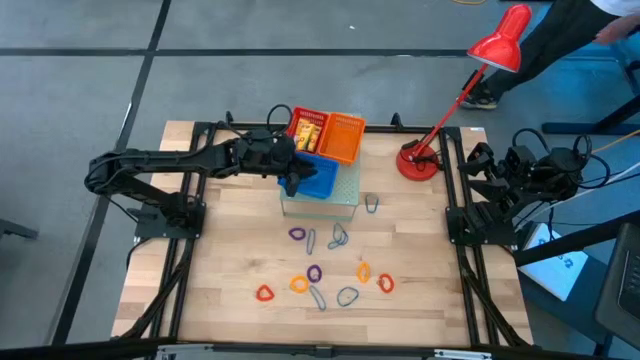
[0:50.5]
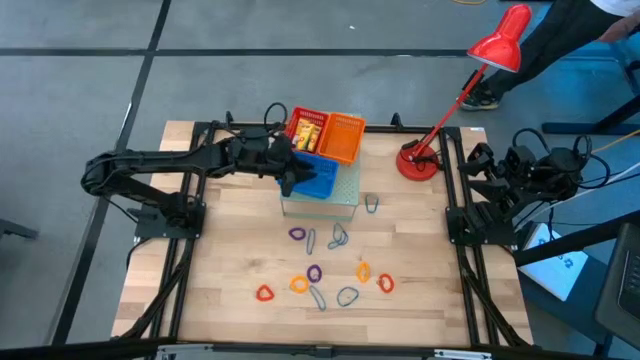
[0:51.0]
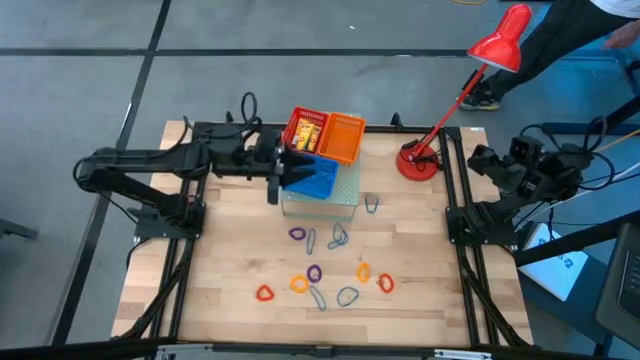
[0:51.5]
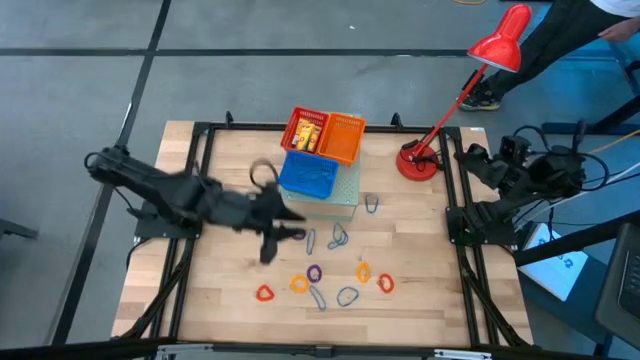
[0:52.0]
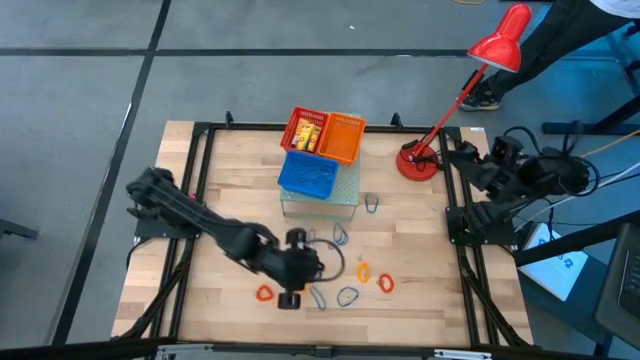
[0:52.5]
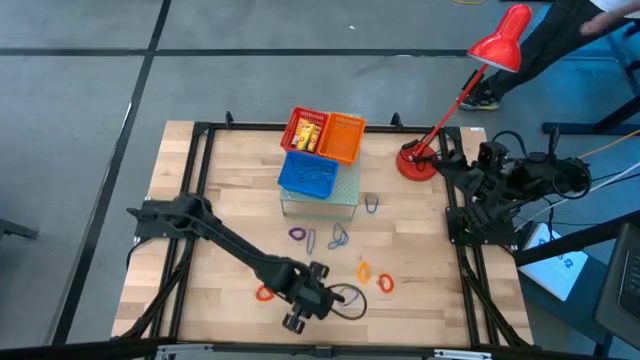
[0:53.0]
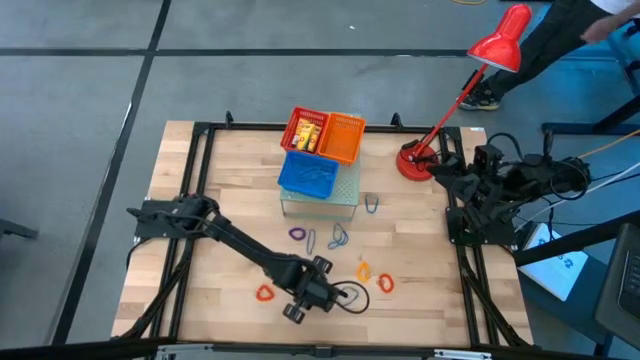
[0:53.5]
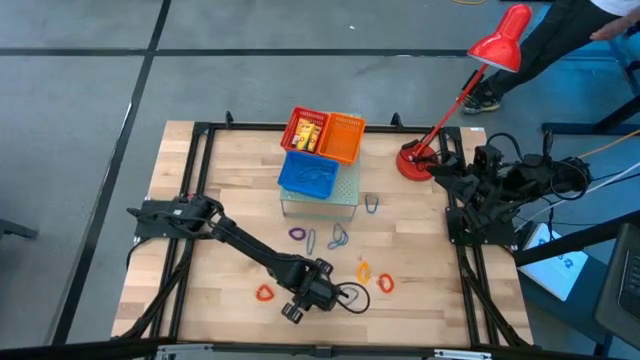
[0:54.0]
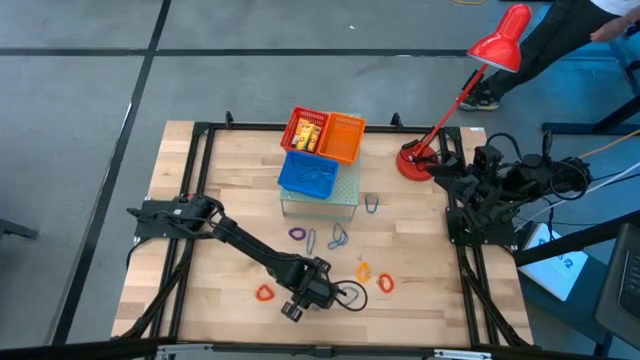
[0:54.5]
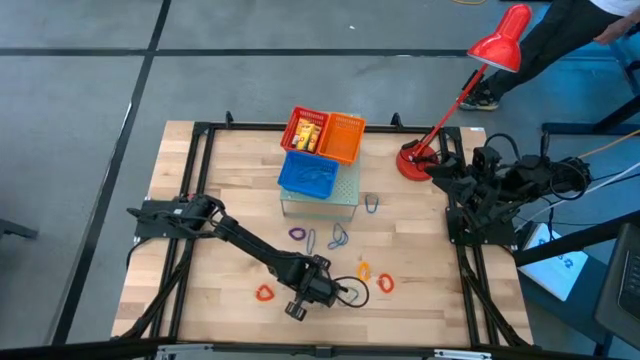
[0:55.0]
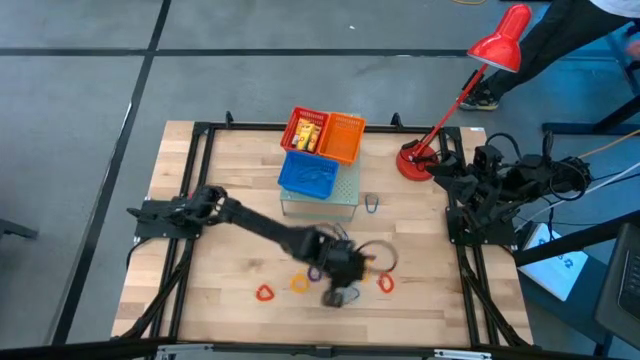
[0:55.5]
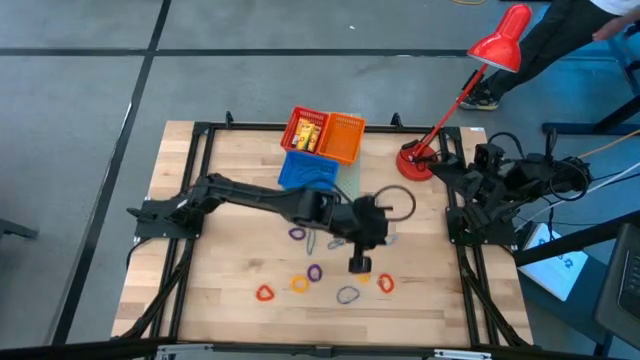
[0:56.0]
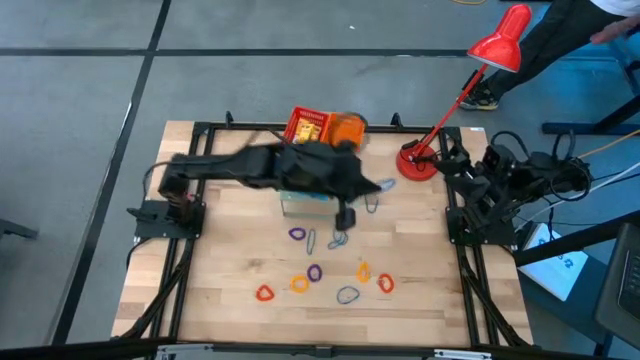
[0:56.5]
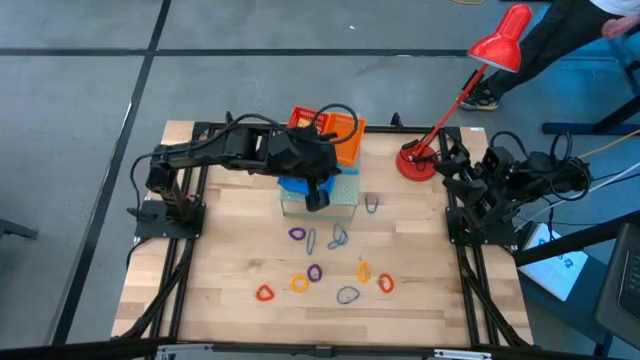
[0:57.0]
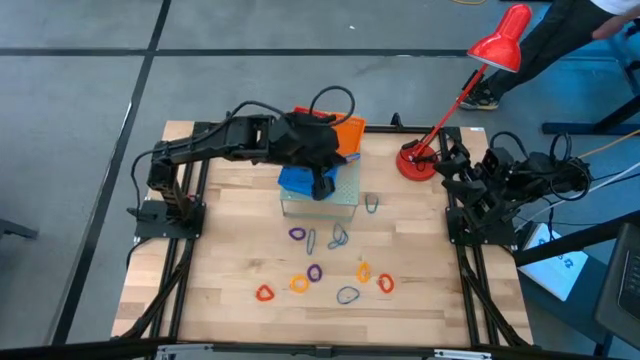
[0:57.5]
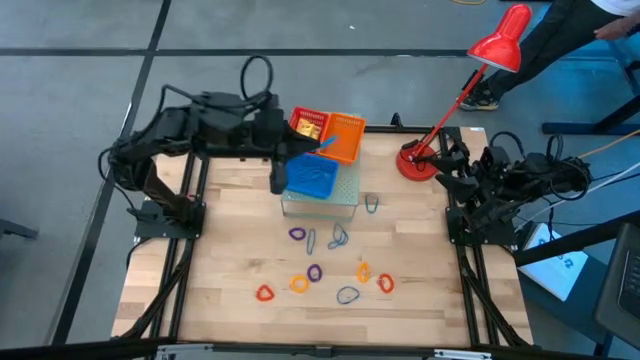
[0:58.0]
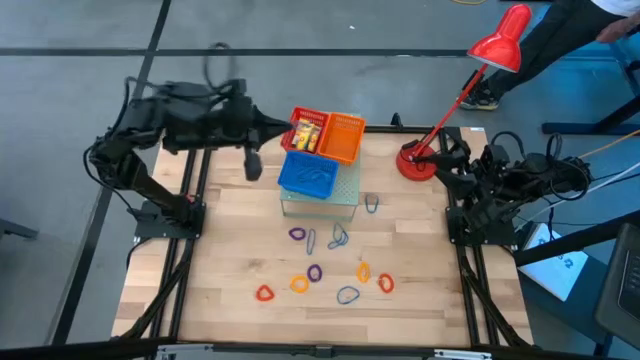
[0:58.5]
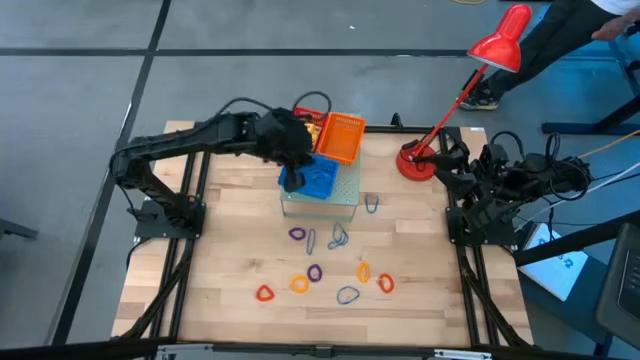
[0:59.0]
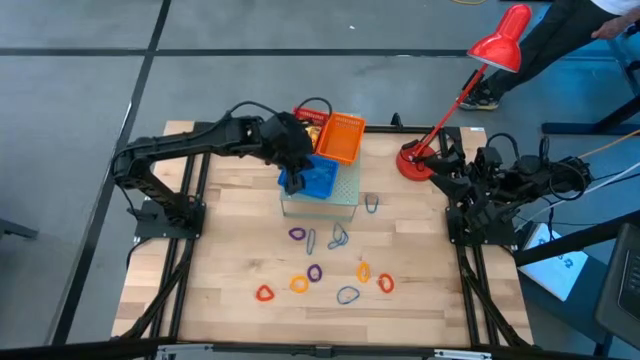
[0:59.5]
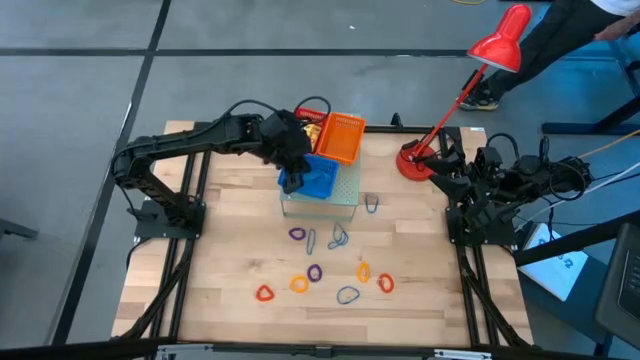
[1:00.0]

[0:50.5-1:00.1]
Task: Pick & Place Office Desk Supplies
Put the blue rubber band into the blue basket on the shelf

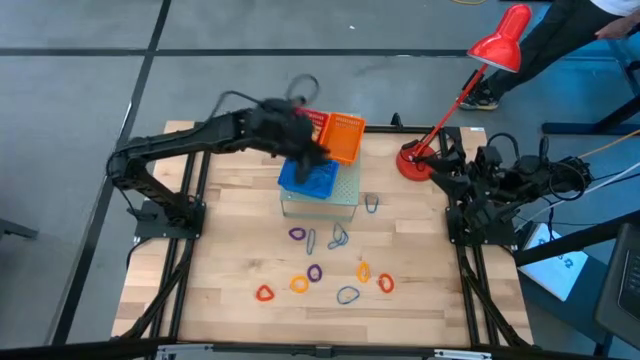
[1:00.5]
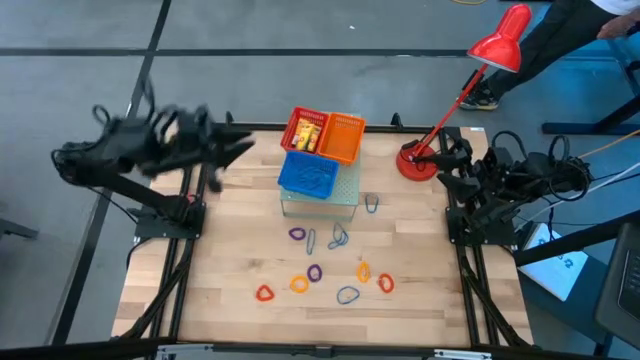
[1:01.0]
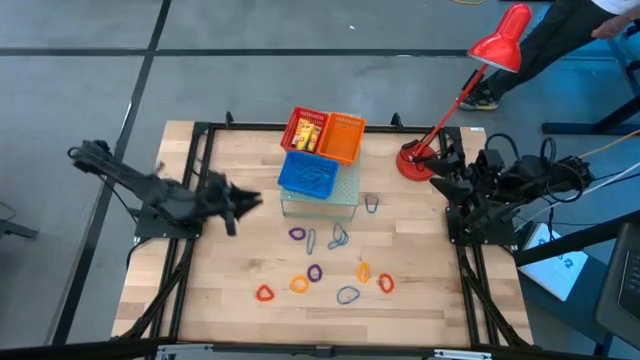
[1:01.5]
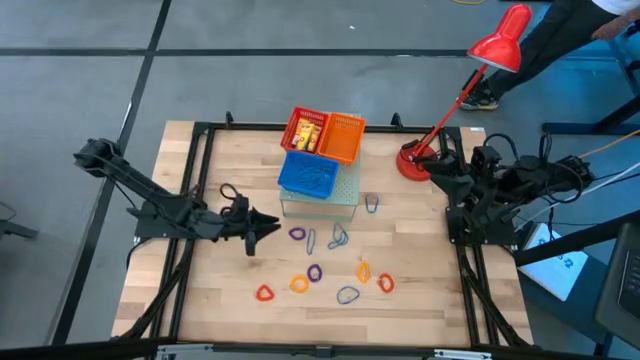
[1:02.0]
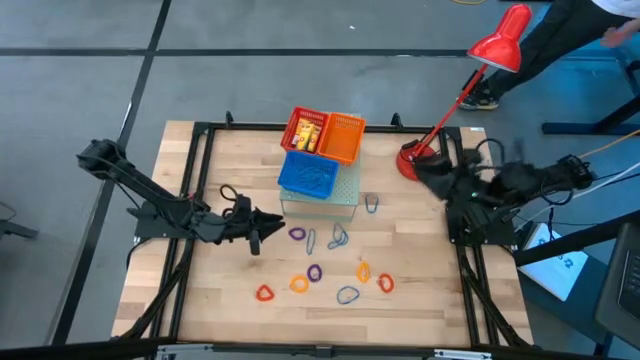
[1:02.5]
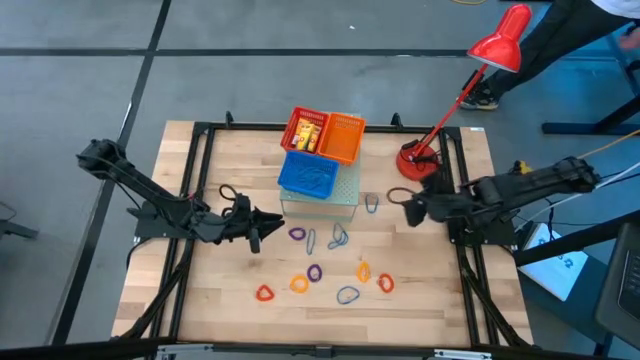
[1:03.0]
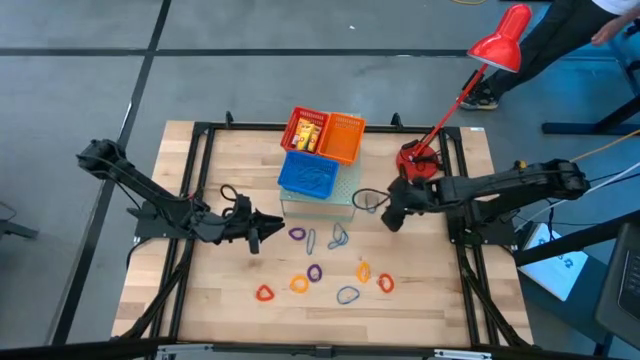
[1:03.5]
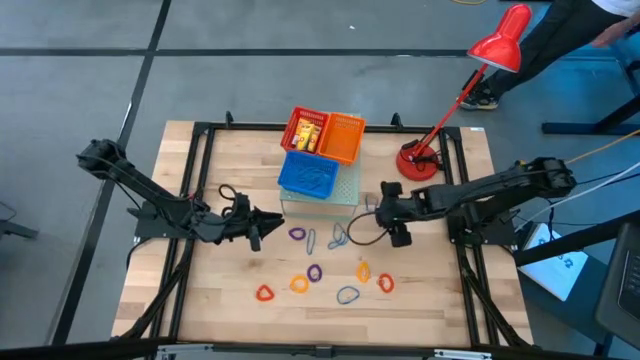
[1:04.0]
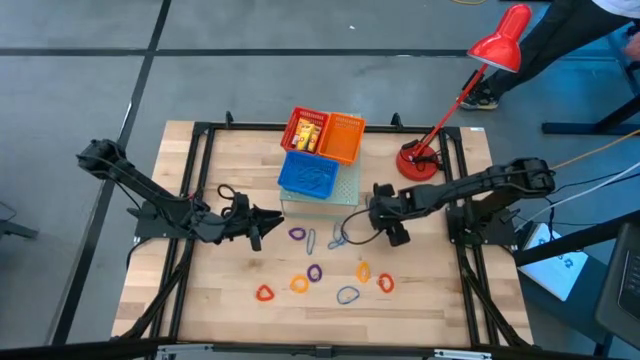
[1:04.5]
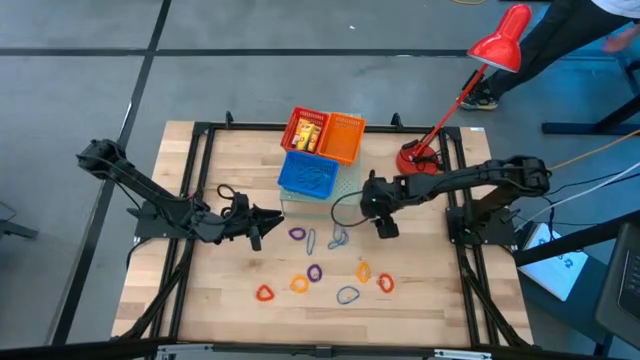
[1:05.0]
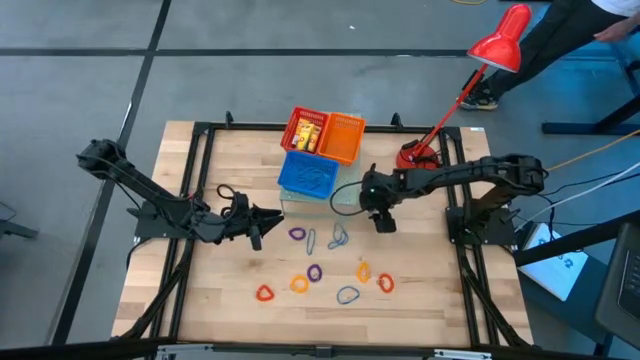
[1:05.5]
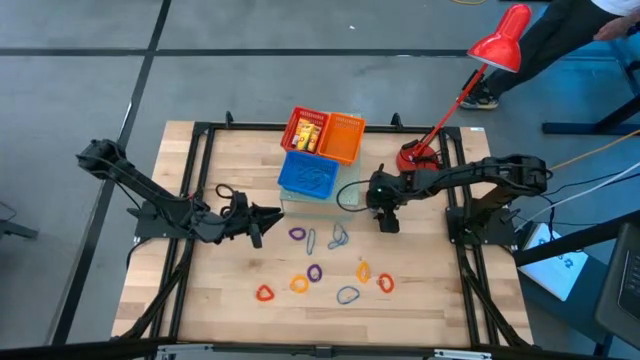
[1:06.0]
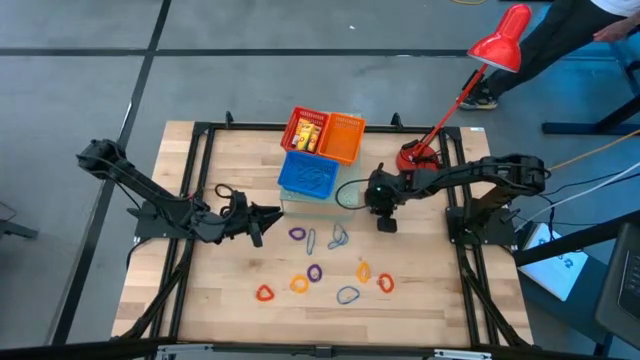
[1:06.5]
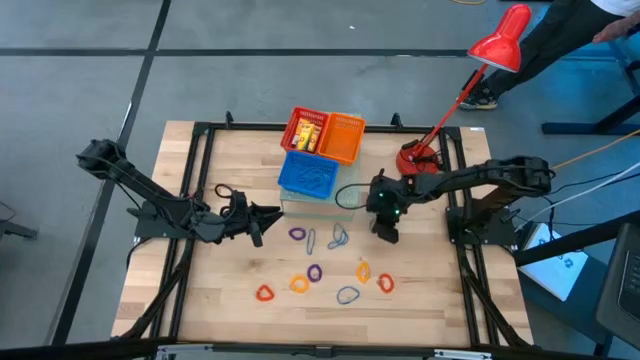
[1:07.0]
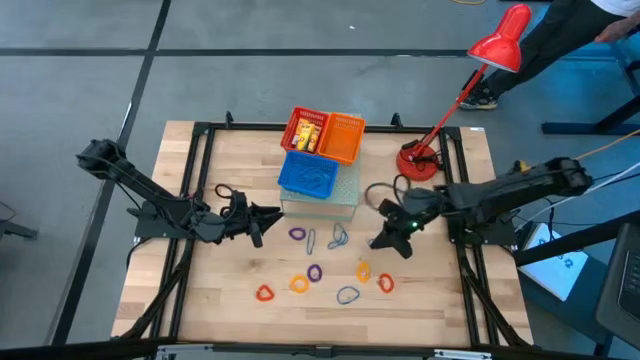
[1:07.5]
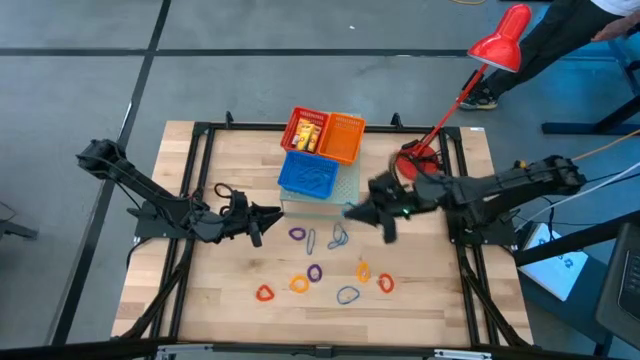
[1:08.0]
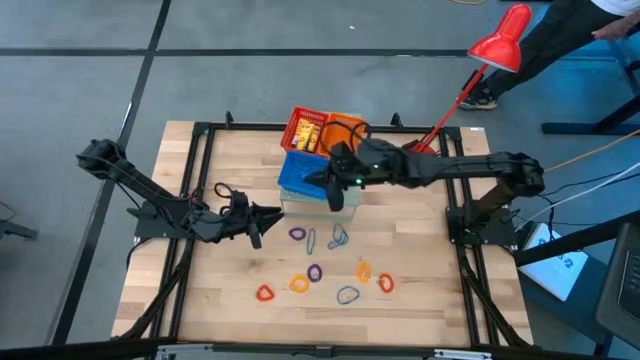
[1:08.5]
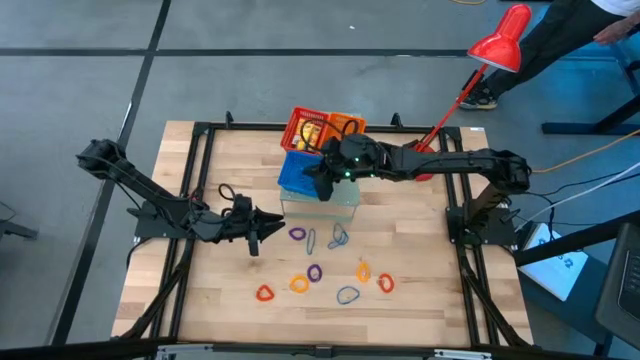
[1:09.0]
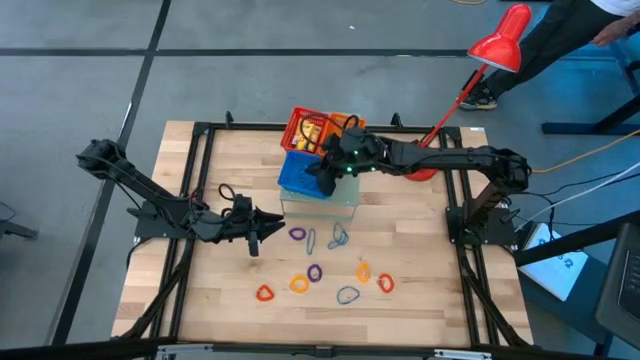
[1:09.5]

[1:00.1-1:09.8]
Put the blue rubber band into the blue basket on the shelf

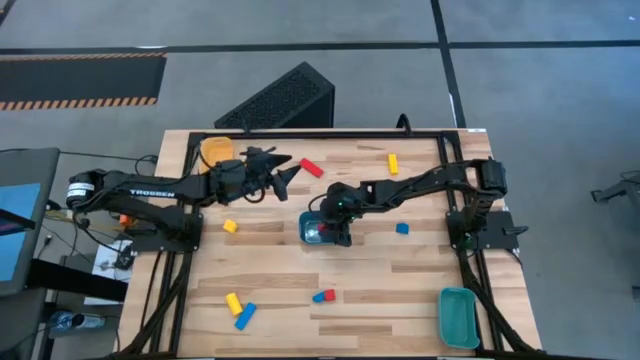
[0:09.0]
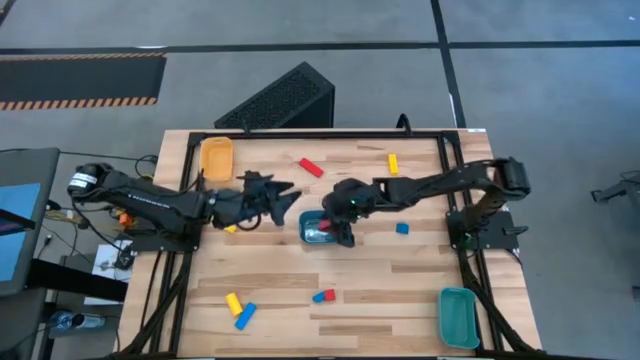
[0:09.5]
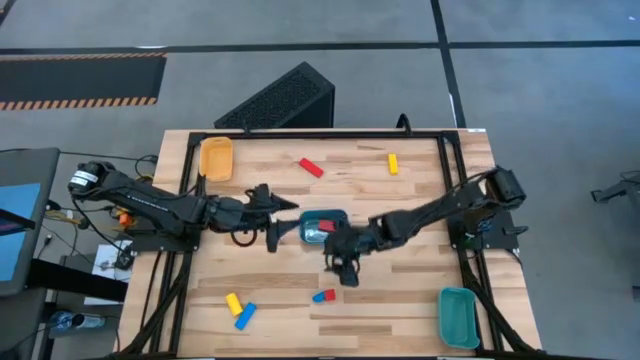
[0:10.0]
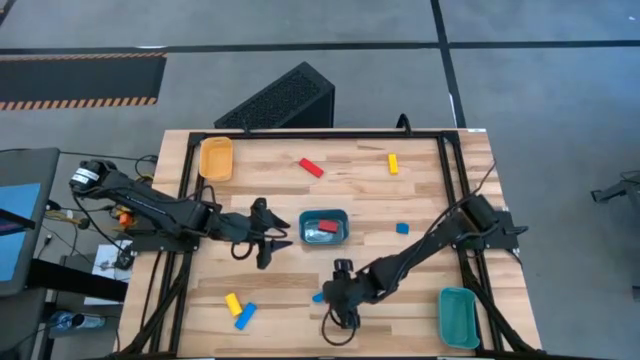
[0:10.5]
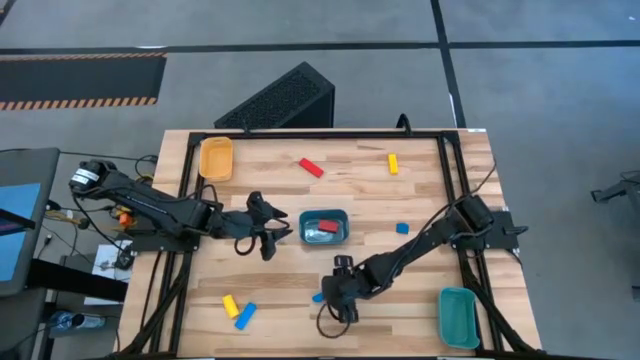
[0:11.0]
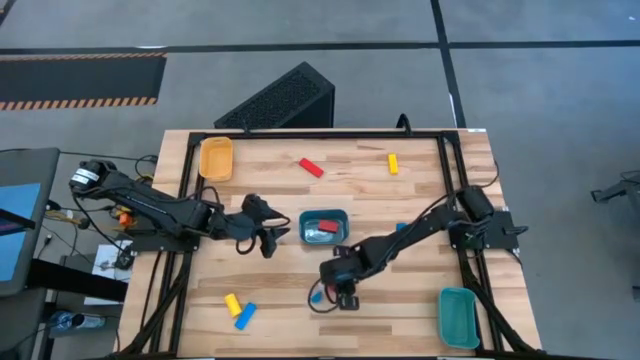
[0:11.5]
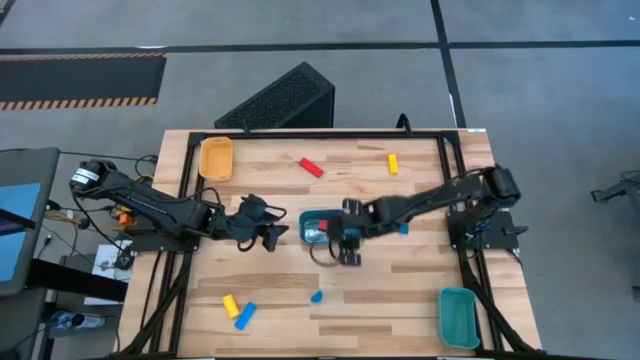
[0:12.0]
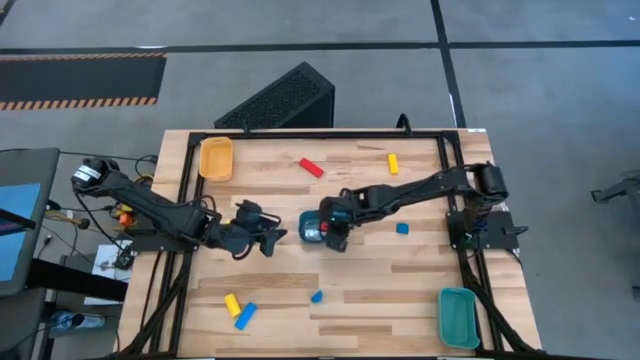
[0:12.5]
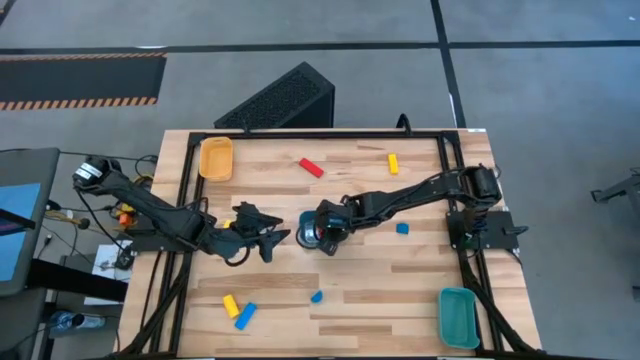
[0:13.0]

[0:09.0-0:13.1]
Task: Sort & place blocks by color
Put the bottom red block into the blue bin
